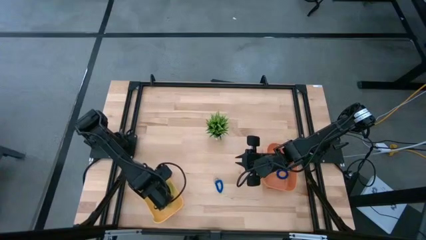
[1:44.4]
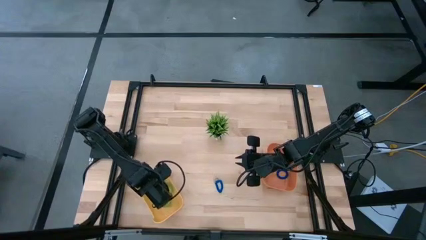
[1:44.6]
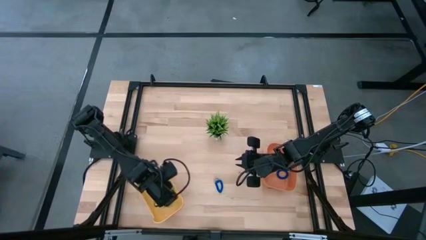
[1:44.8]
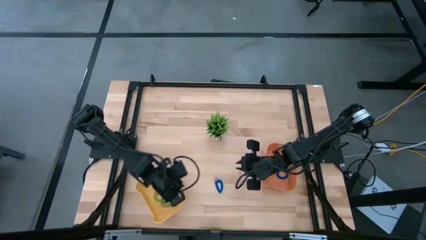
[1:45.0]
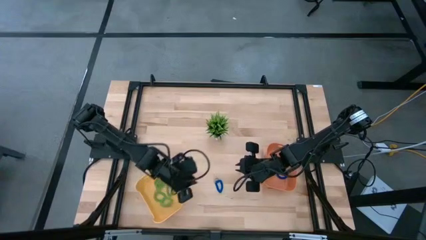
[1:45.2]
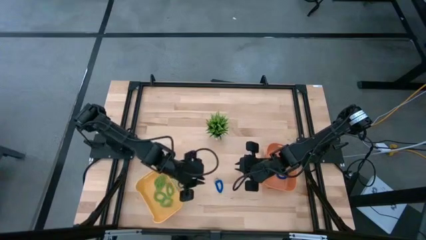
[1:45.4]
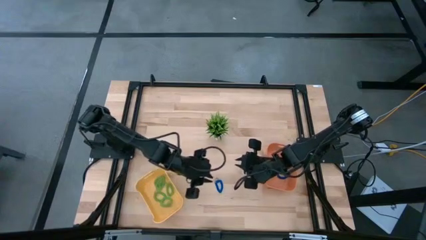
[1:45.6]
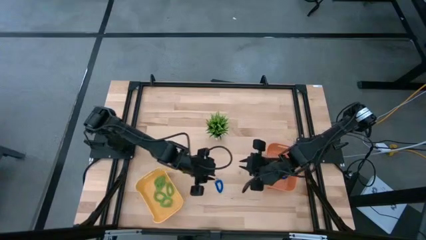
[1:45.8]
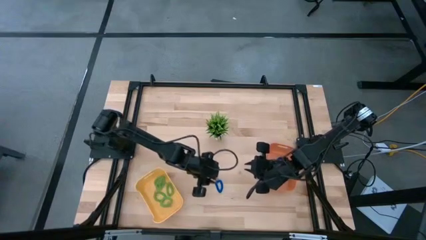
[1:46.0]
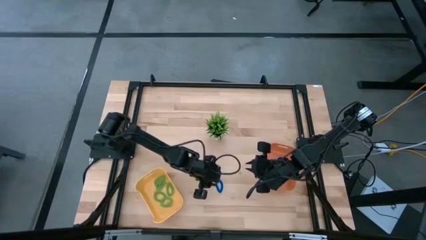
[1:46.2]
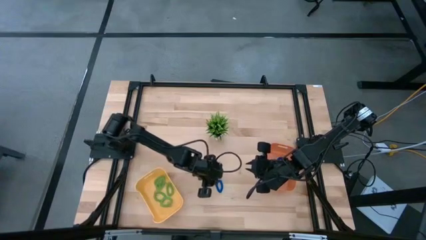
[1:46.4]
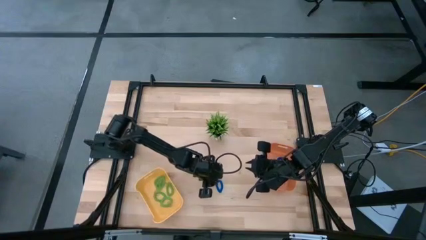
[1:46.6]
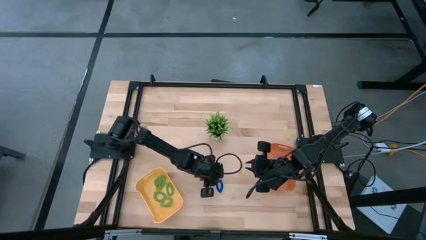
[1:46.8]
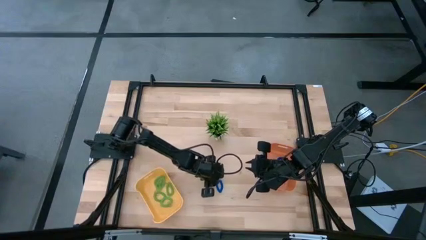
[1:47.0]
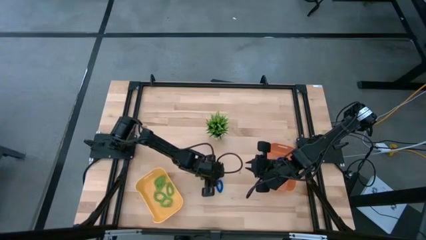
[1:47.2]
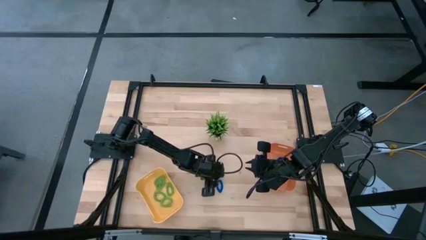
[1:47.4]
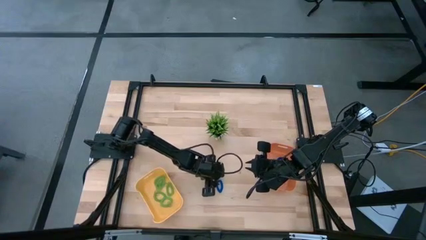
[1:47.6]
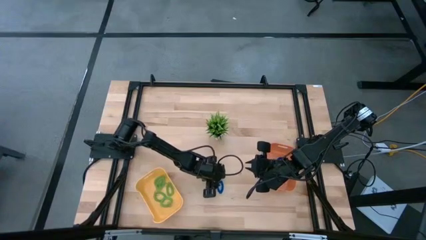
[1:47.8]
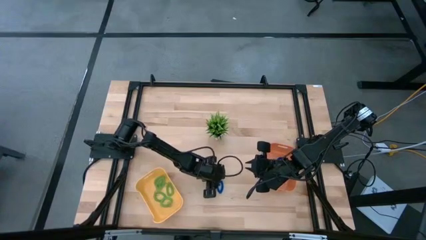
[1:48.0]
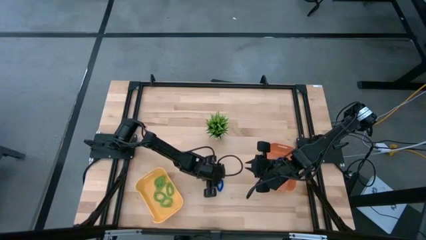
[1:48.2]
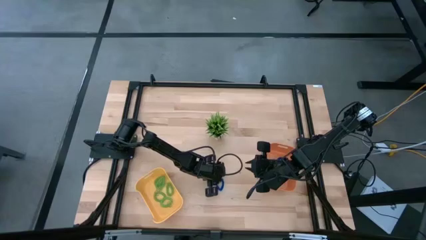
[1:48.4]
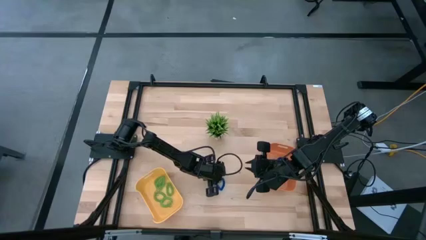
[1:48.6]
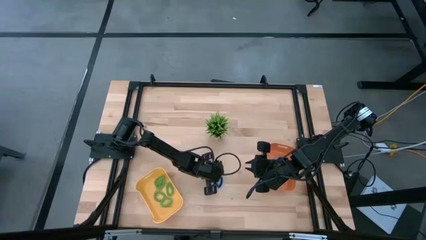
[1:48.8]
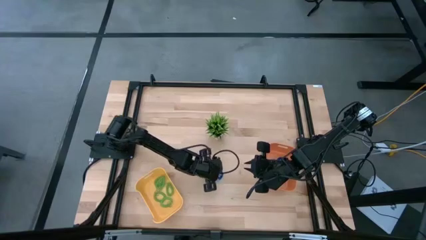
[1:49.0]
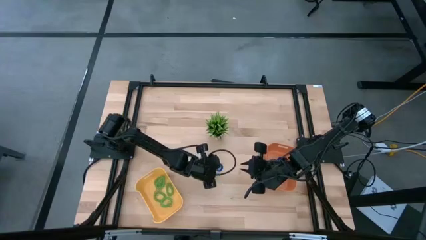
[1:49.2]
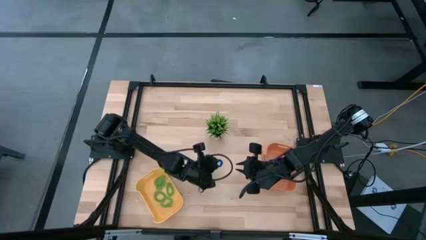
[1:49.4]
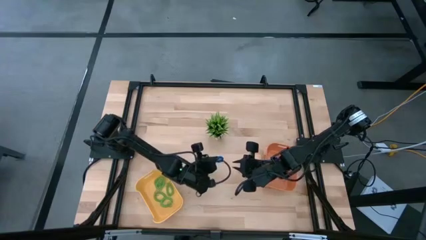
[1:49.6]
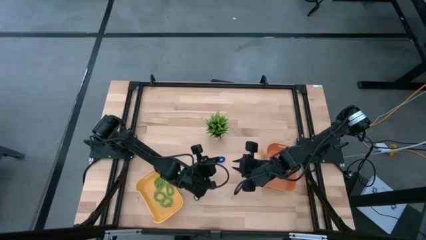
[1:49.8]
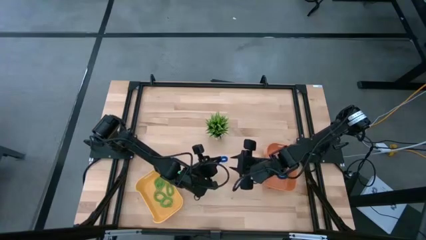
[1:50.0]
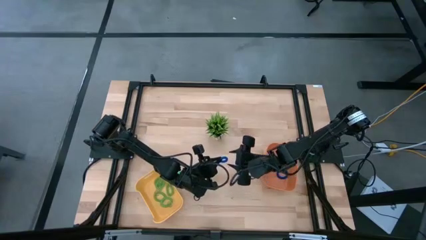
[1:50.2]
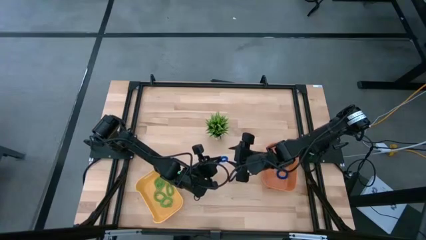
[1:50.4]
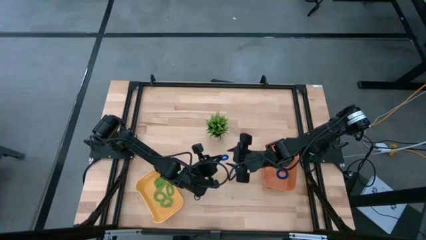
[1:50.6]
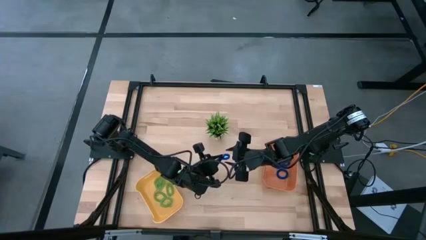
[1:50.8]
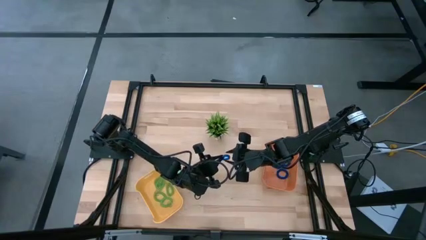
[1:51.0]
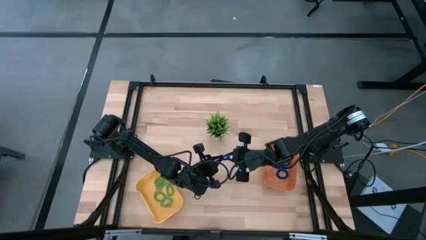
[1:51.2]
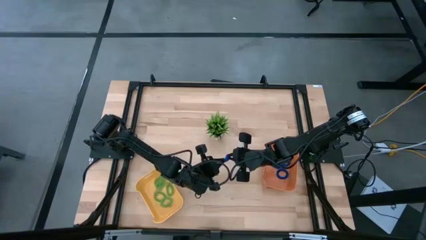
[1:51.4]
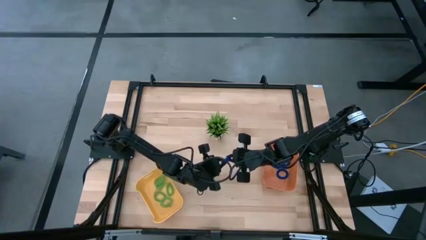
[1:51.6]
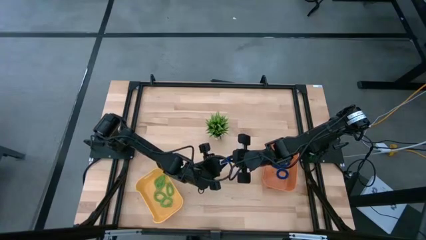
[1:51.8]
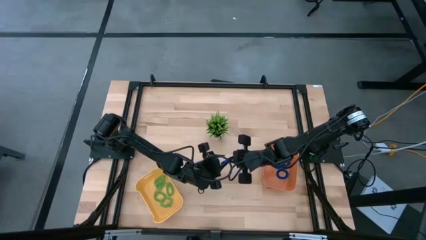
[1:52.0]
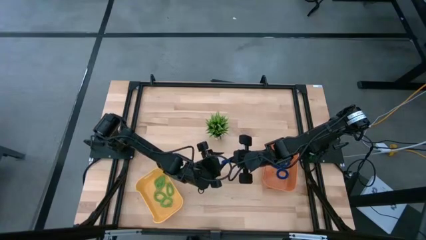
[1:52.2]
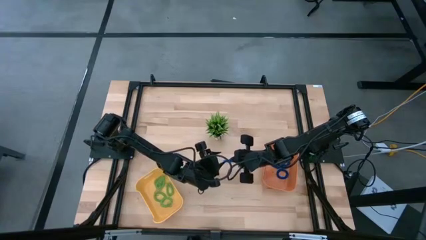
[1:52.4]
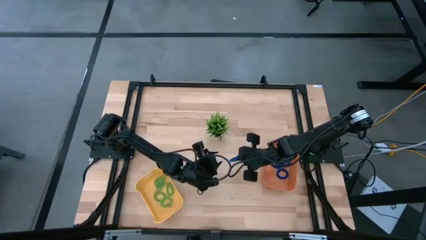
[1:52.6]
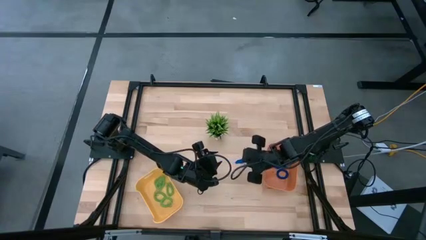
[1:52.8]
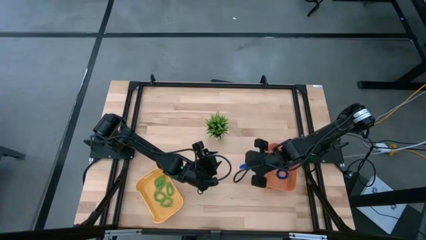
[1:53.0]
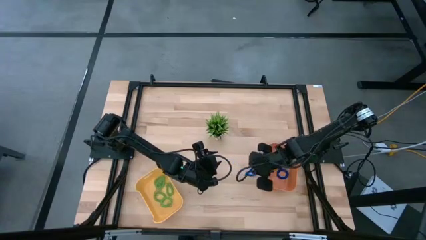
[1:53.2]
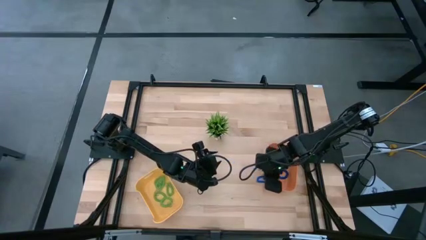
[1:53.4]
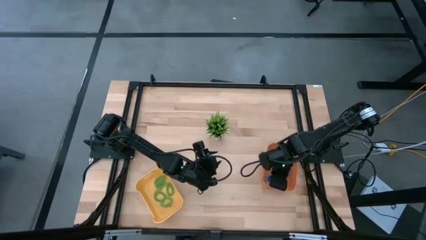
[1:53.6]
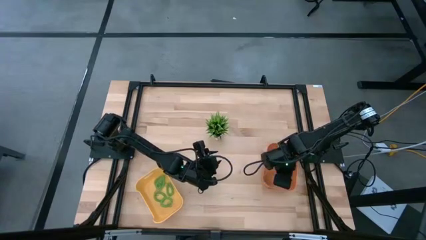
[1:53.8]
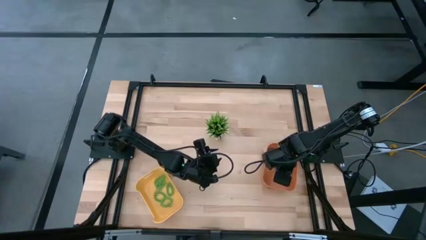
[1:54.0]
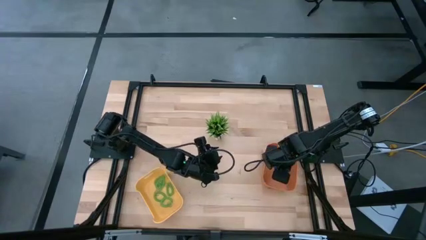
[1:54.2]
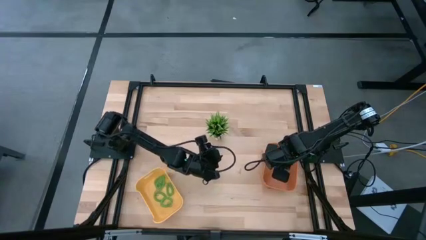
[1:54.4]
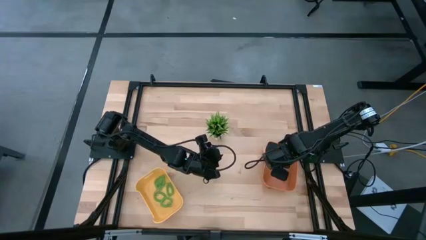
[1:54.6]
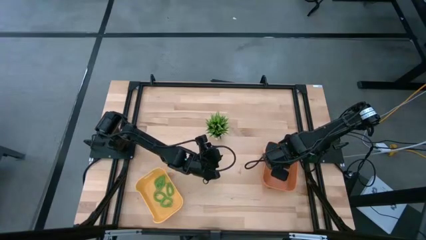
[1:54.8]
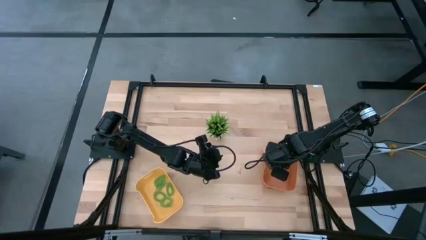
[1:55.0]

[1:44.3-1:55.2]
Task: Sort spring keychains
Put the blue spring keychain into the orange bin

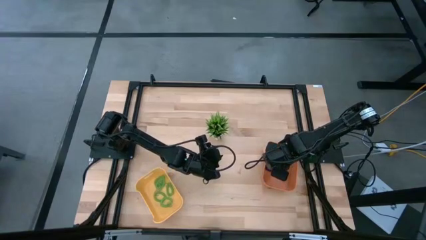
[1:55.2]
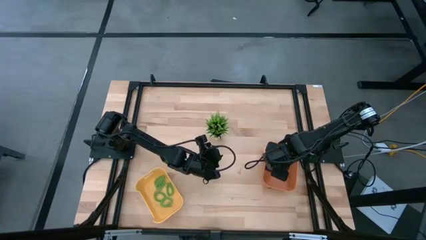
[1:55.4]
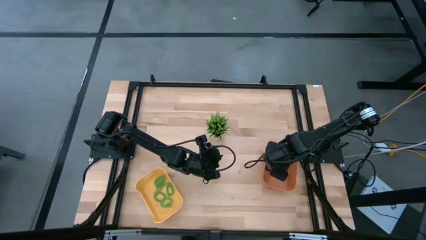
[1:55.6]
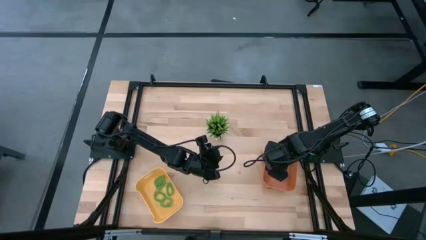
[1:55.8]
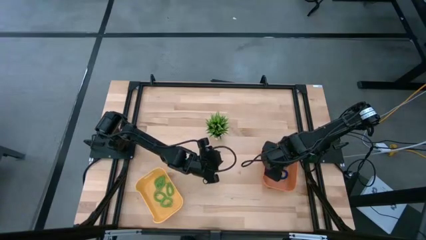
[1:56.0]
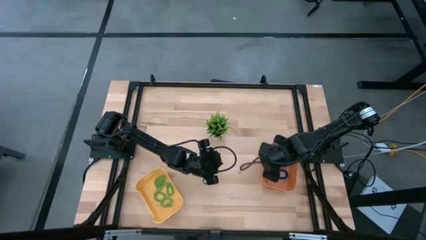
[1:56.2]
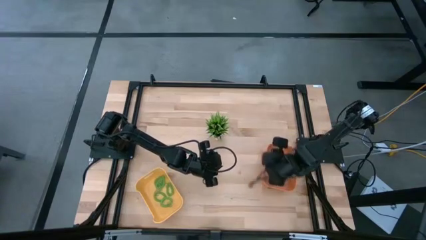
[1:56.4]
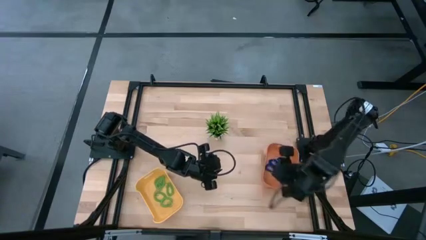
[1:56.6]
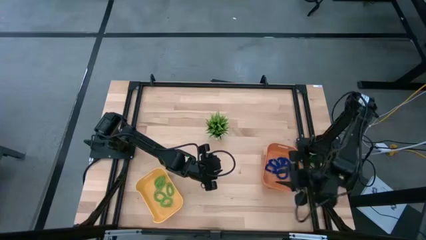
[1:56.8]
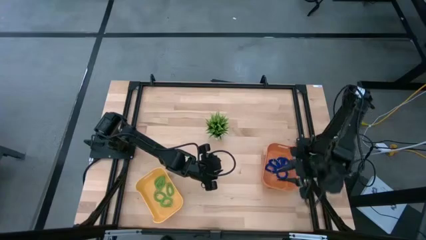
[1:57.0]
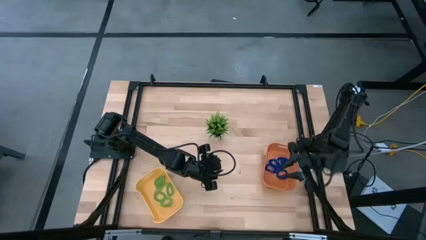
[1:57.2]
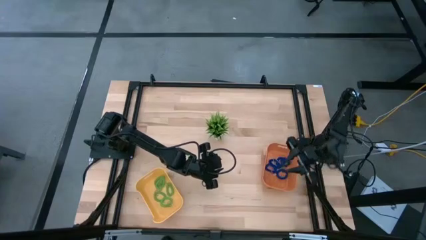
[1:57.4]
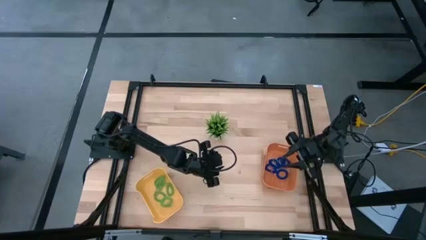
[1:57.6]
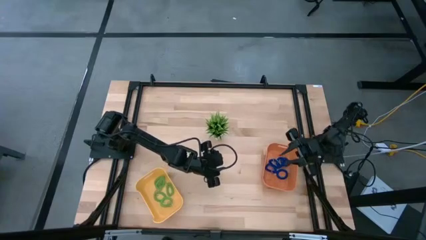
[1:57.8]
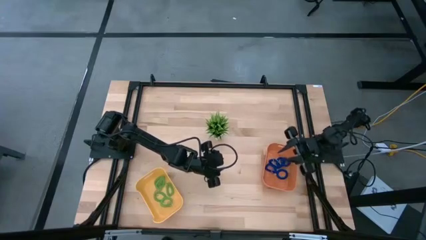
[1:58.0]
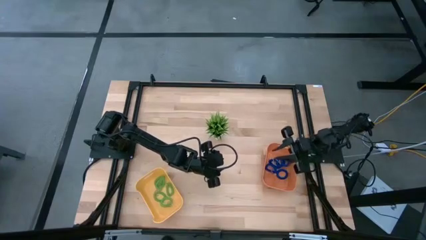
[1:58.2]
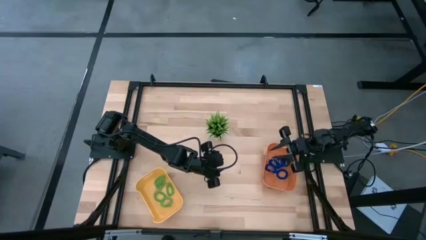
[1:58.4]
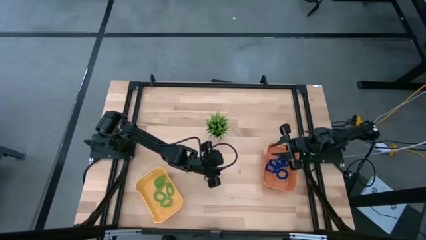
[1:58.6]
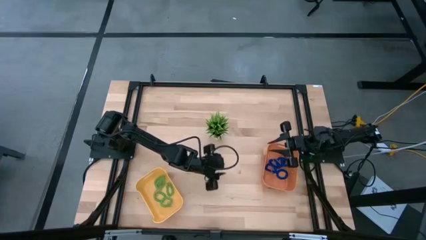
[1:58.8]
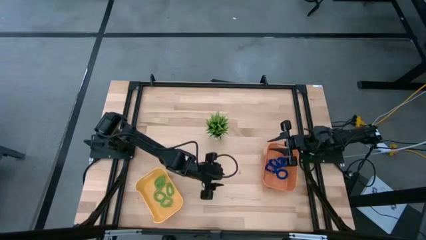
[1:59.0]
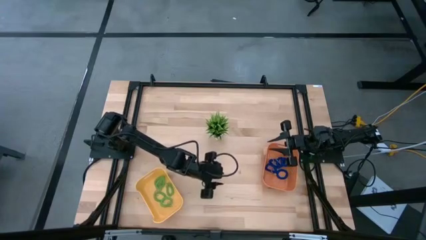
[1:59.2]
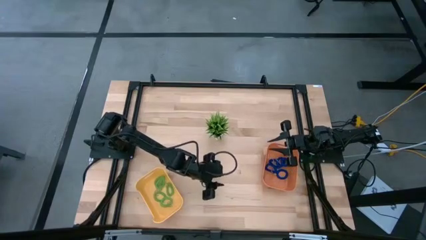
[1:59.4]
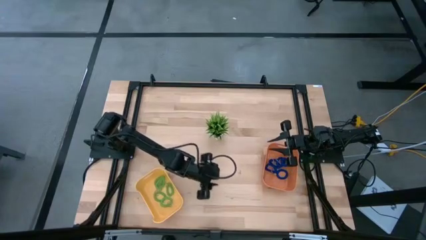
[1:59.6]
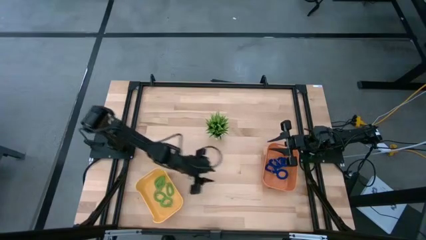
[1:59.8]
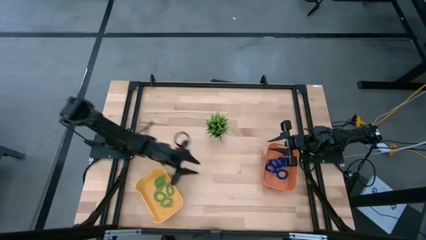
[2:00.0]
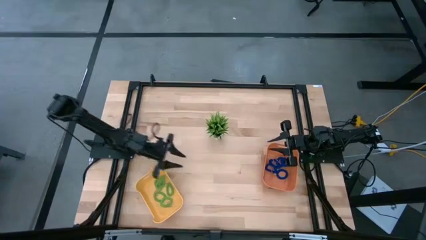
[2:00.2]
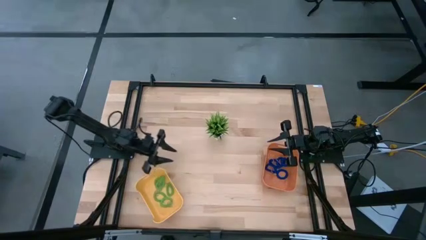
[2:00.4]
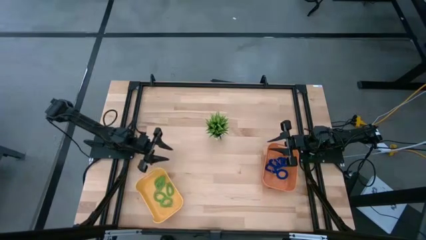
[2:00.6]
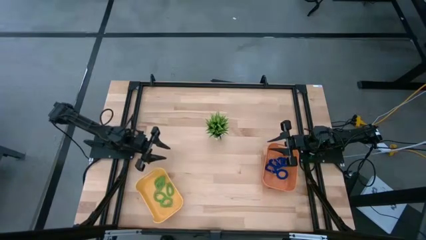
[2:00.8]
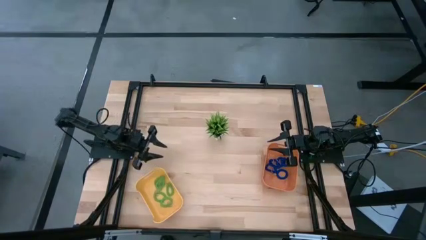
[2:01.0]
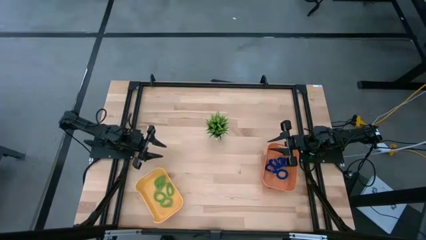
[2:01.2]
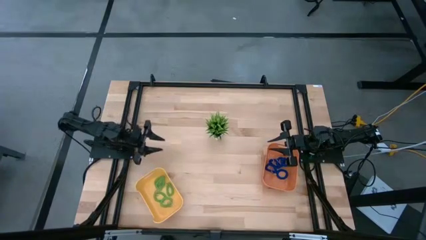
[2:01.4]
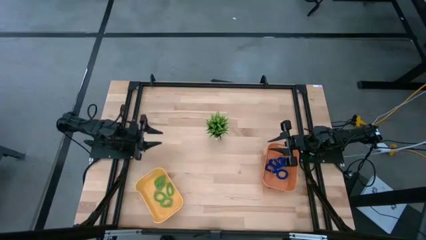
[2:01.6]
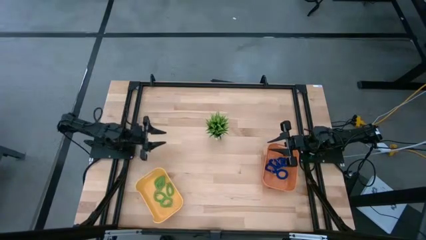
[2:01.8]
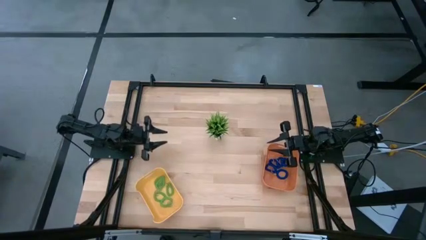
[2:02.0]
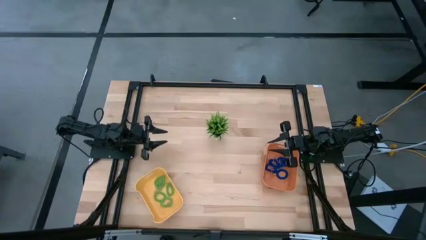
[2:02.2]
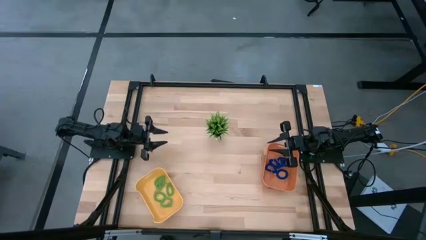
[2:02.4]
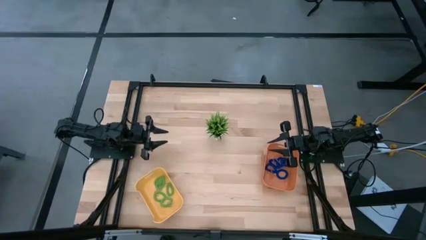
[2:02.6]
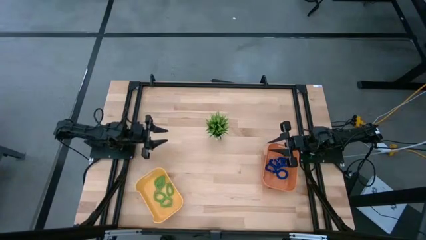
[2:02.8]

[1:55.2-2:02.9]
Return to Home Position
